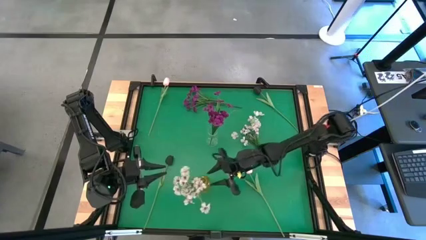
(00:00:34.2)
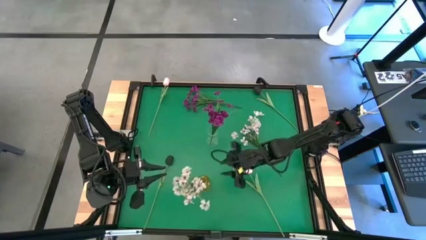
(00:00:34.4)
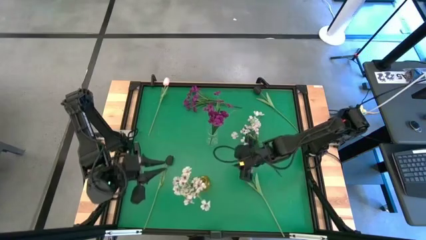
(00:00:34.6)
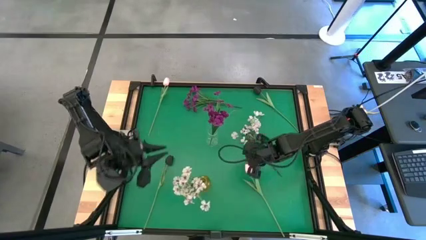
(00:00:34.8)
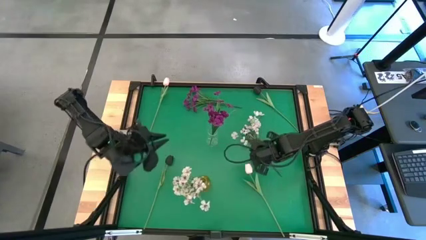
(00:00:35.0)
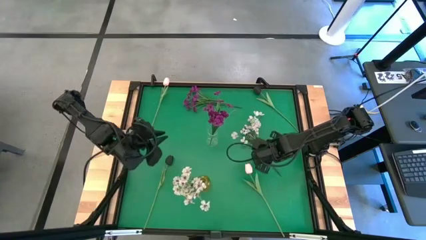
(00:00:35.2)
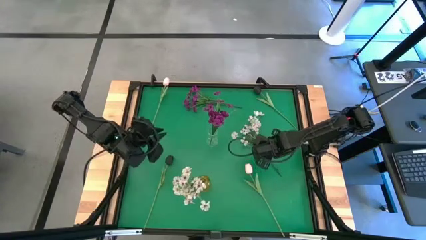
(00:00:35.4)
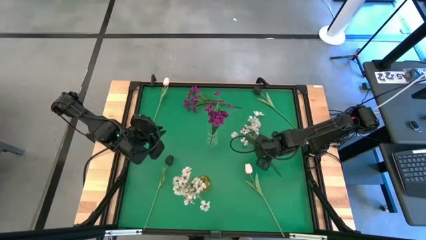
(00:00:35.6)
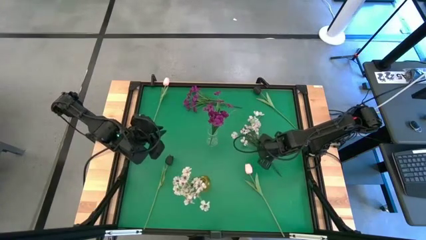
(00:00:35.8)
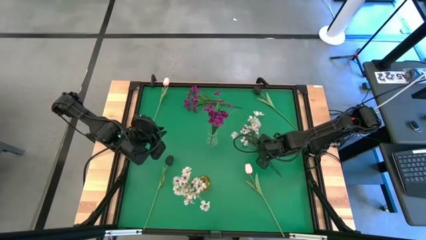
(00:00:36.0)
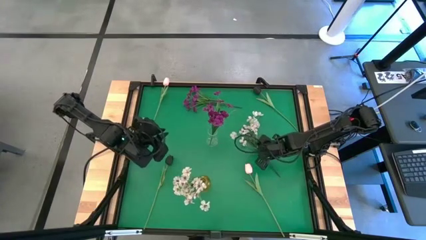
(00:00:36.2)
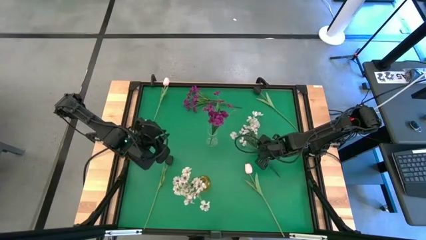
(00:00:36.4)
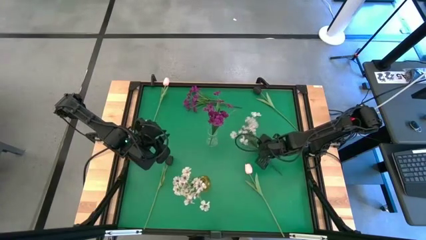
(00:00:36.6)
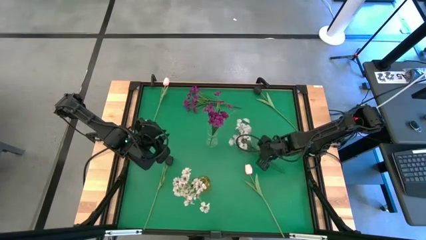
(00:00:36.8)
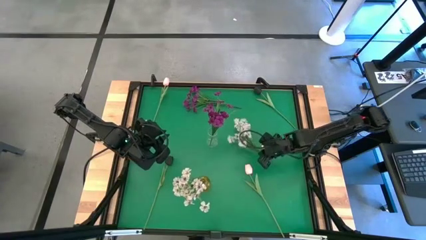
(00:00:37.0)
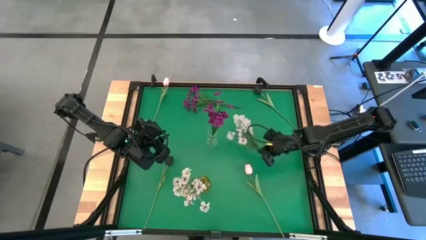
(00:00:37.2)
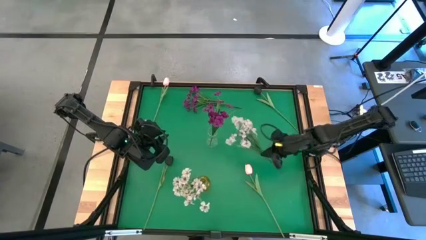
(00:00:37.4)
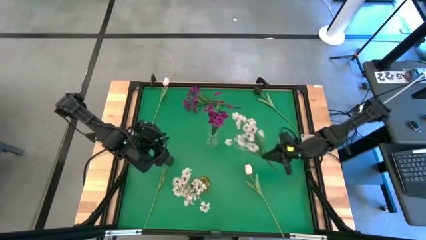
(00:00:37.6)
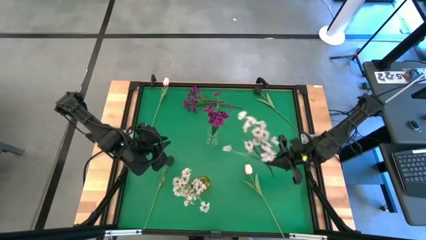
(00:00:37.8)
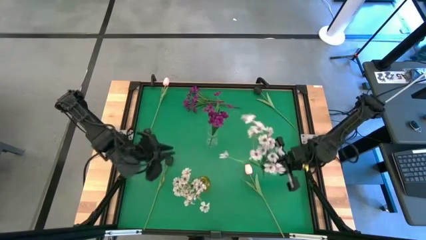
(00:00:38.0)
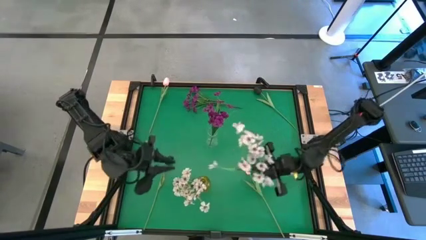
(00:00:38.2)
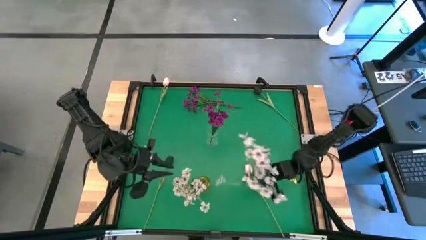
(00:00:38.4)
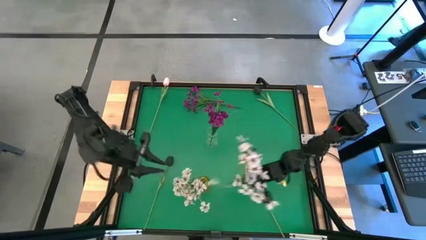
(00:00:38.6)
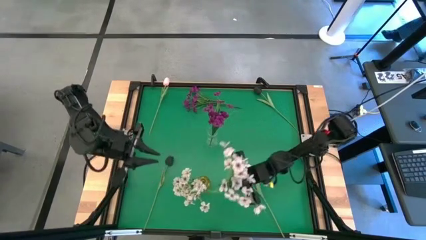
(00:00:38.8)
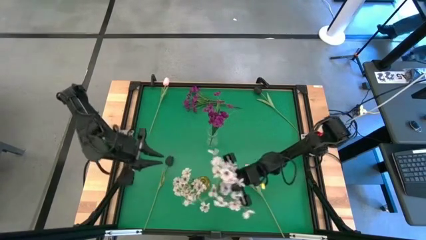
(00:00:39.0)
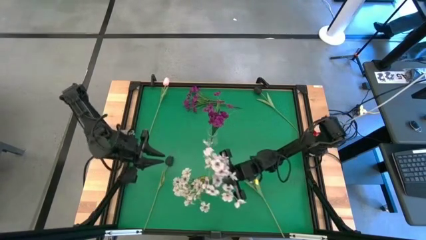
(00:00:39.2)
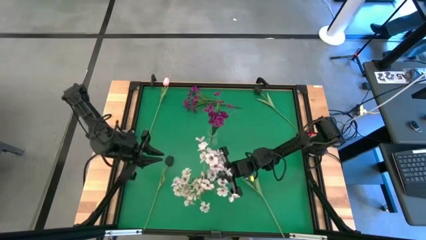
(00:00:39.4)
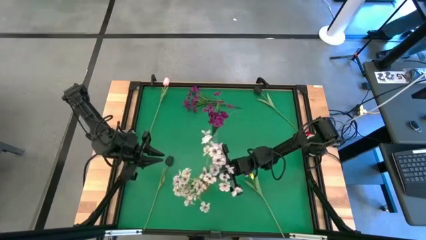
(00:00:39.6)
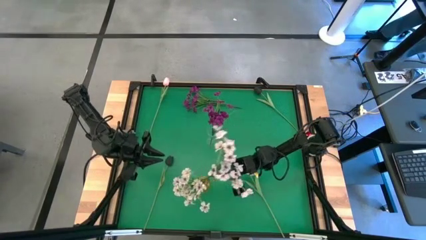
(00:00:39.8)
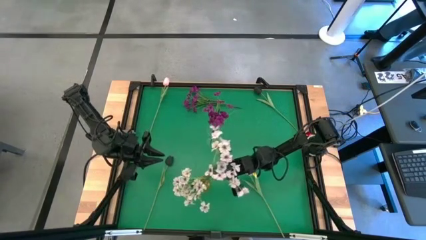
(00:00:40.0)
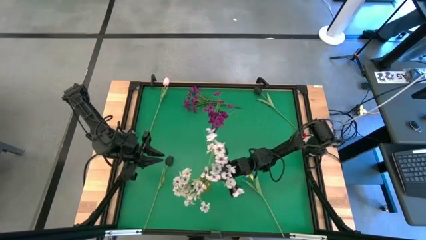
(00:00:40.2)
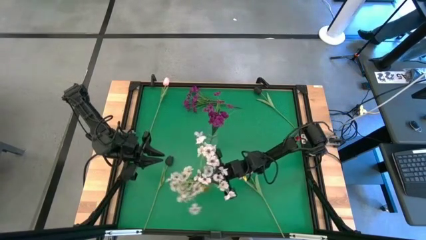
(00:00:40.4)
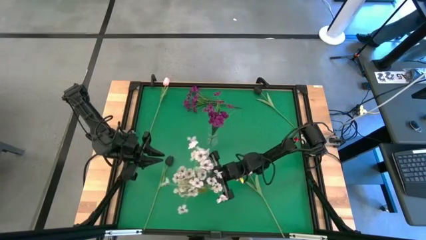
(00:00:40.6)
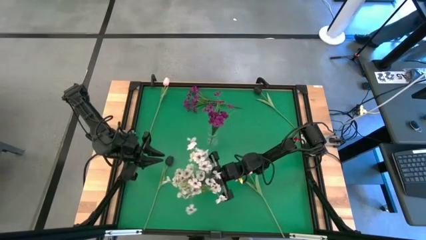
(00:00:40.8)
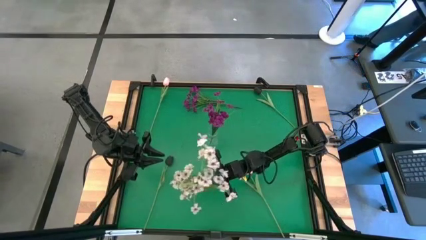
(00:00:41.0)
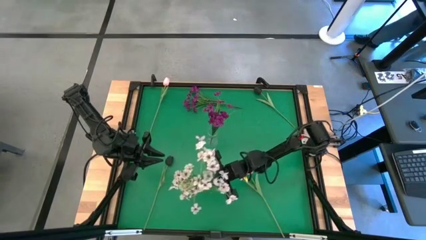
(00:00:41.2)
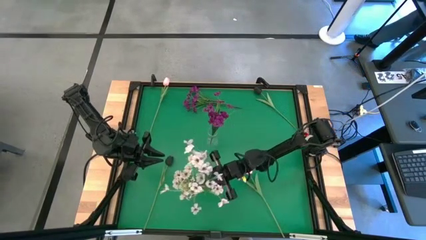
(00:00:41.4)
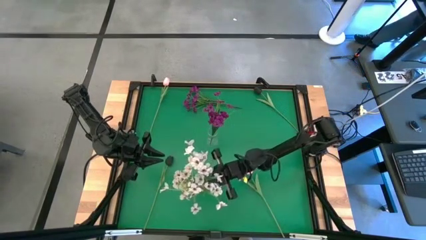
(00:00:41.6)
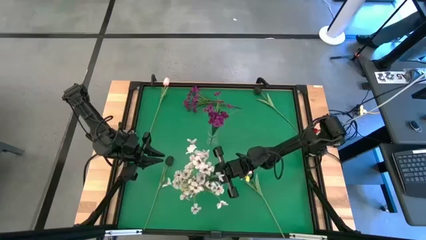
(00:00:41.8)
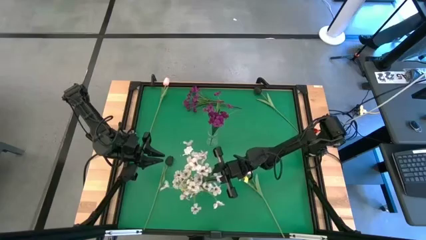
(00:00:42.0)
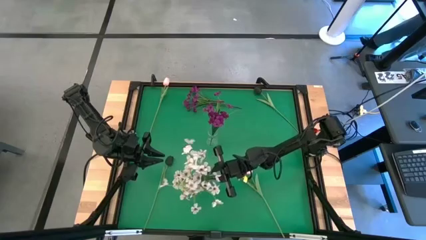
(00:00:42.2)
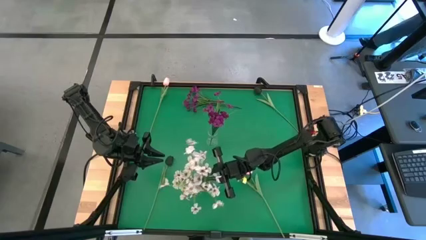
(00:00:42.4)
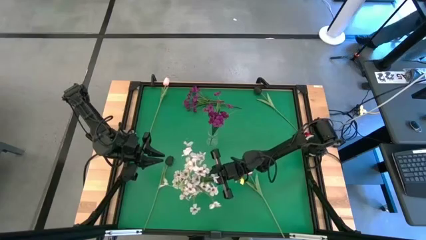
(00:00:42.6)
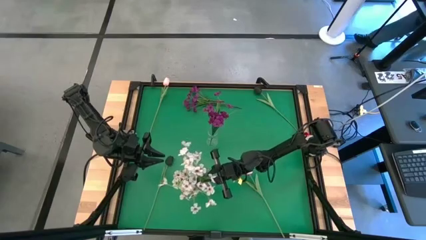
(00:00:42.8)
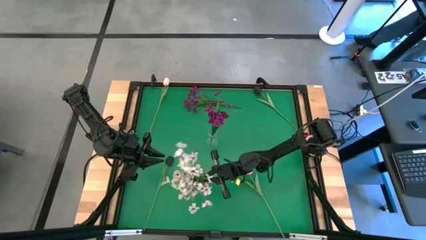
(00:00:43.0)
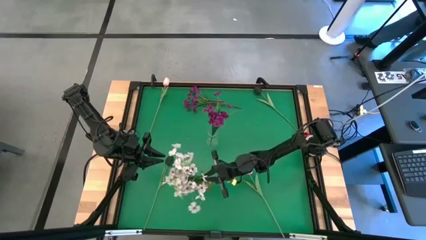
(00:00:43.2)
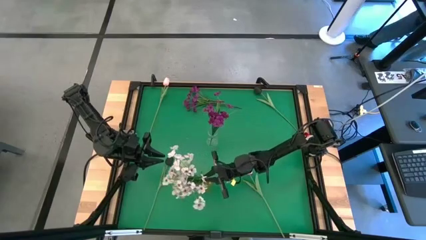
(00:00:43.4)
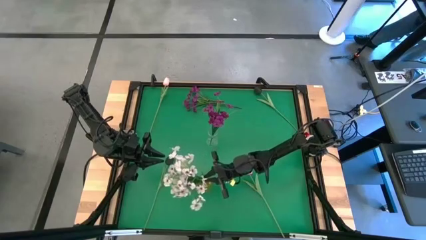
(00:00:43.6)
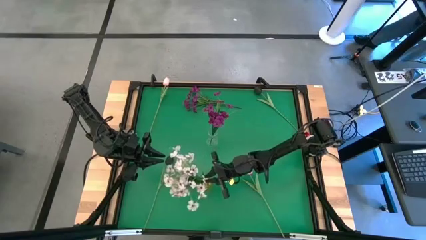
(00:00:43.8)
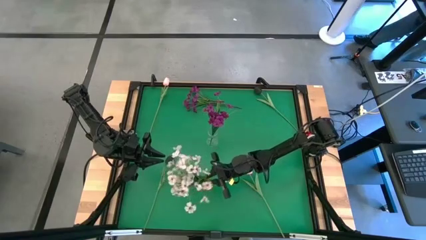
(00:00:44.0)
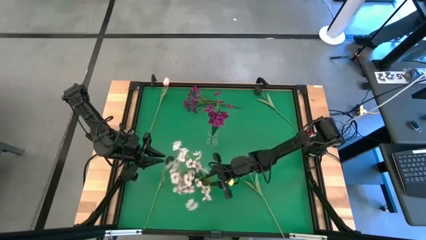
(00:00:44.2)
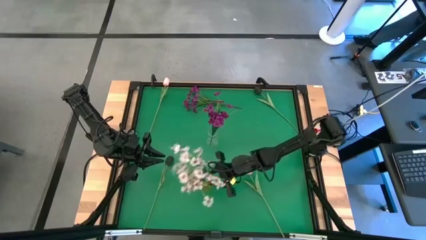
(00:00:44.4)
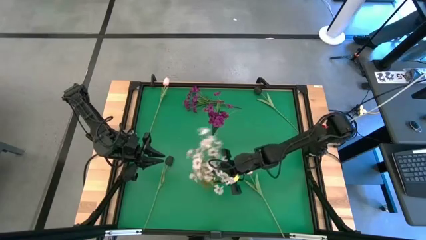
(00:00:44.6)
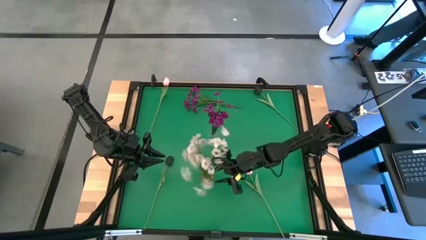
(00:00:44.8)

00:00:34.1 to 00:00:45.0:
Task: Sort flowers into vase by color
Put the white flowers into the yellow vase

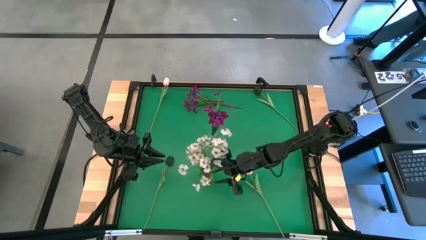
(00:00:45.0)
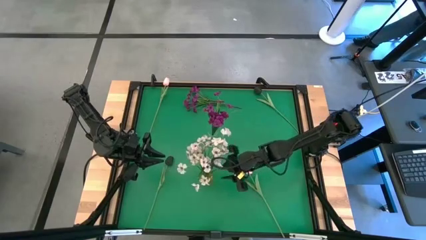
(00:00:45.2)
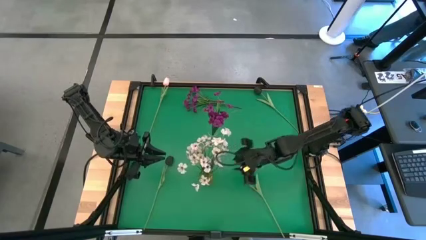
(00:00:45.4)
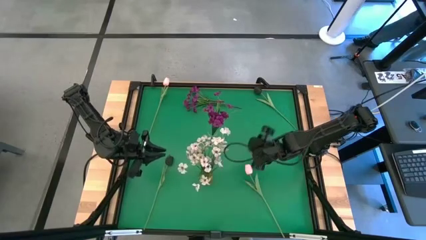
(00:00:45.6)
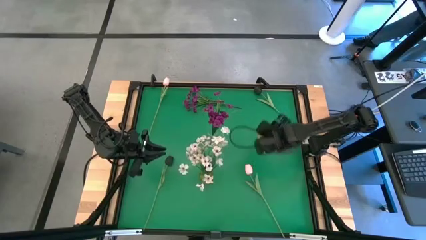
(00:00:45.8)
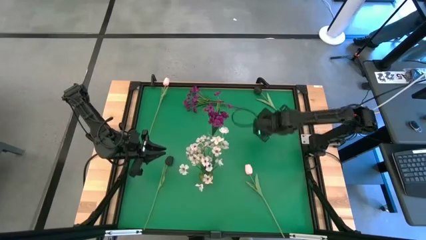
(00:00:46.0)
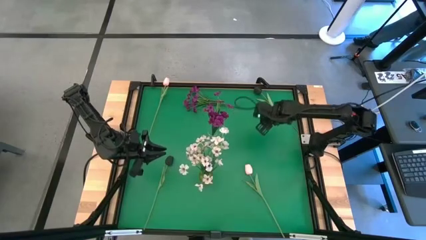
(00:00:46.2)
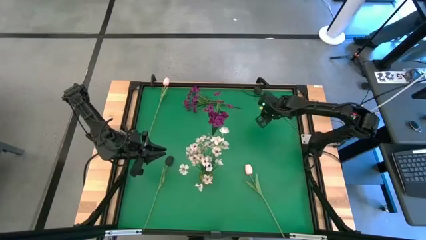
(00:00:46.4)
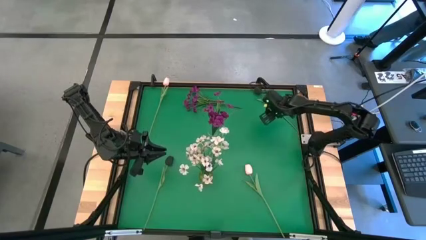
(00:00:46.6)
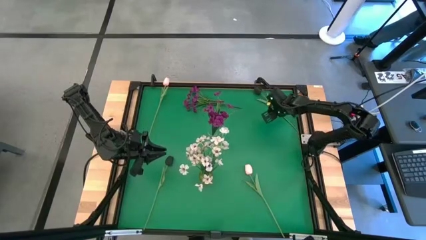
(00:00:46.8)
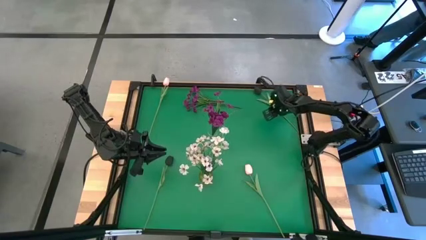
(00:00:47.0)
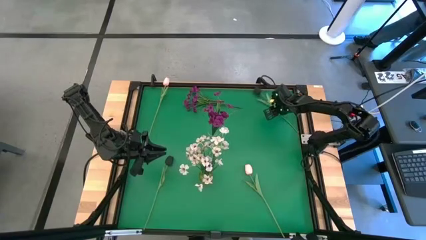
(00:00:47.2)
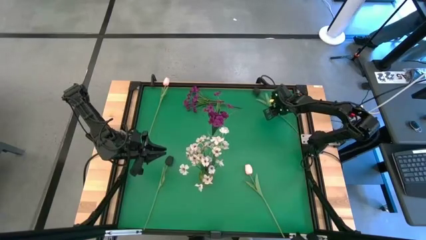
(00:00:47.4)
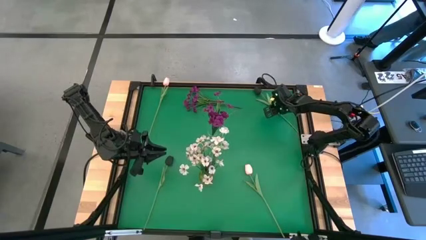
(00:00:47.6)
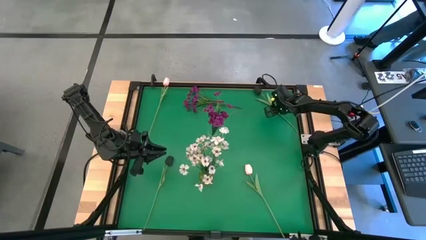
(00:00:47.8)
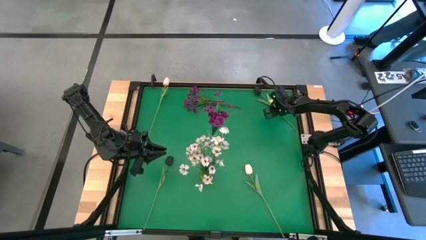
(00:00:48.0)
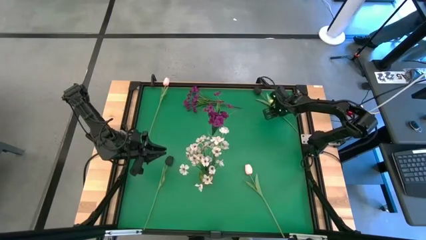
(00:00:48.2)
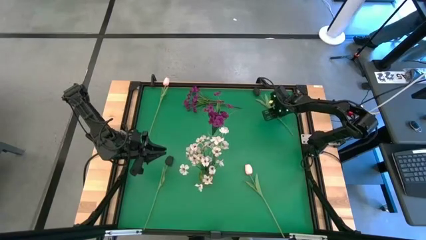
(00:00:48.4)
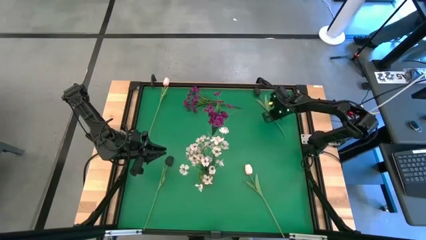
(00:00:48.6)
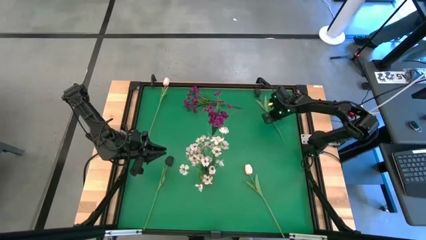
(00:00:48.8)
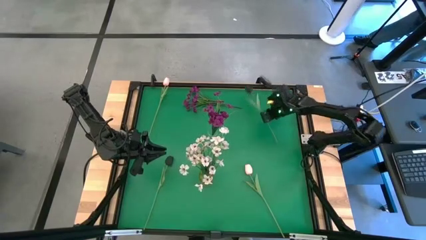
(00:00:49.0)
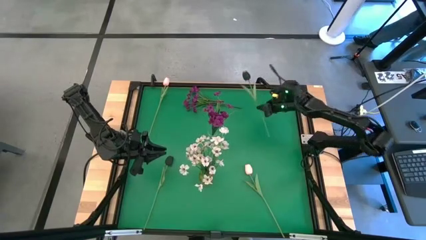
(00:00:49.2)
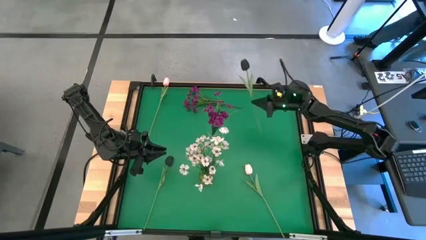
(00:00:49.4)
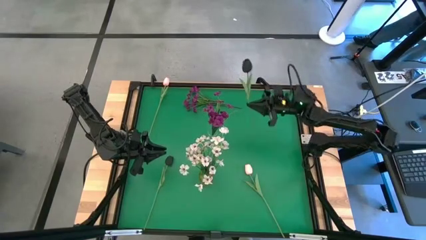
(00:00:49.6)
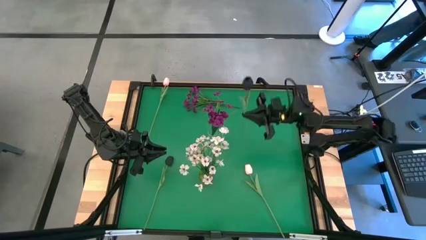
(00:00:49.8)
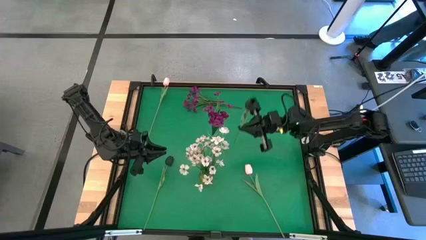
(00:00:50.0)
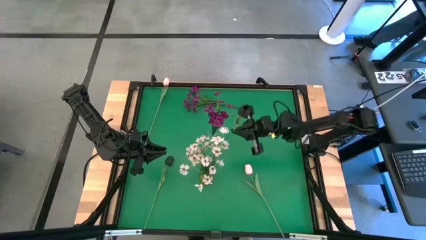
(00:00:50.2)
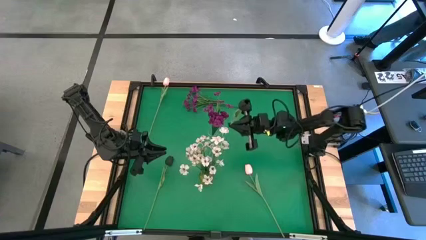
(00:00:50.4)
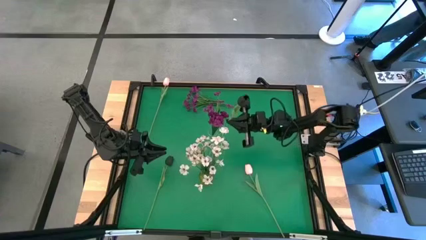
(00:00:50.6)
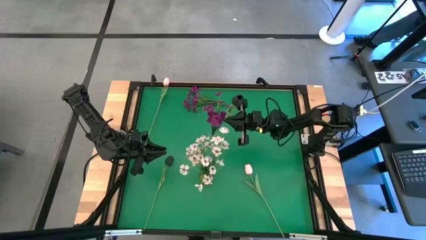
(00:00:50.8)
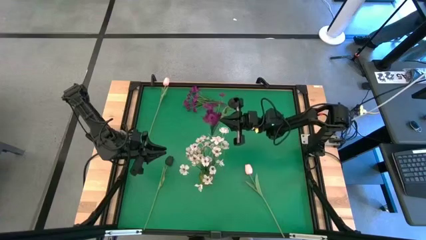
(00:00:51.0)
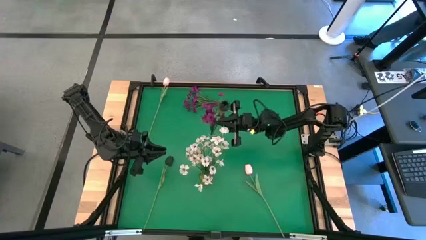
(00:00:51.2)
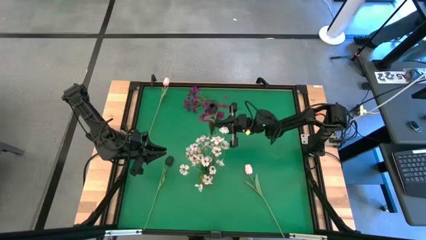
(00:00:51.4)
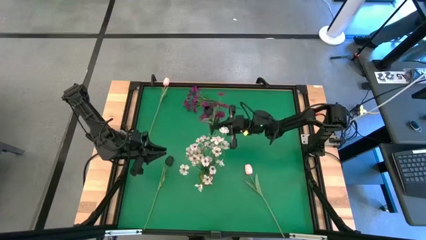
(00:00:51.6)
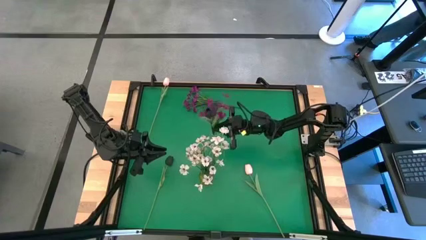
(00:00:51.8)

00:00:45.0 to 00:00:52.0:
Put the top black tulip into the transparent vase
